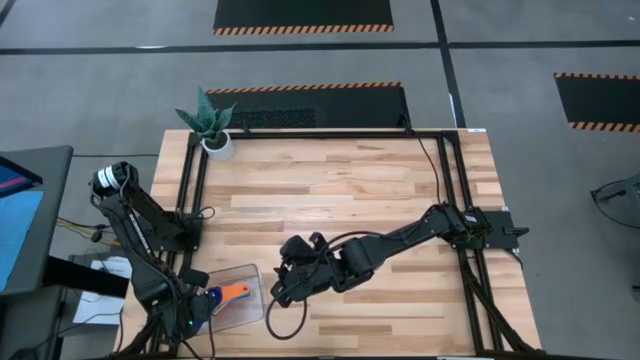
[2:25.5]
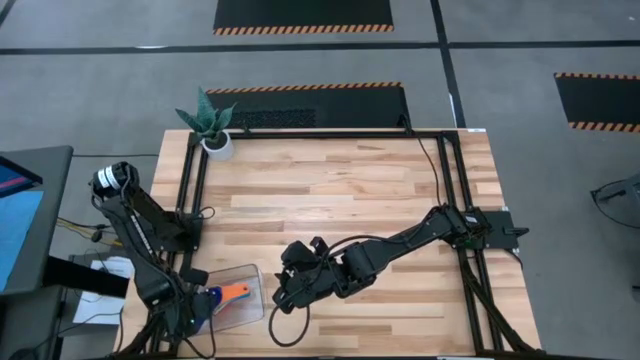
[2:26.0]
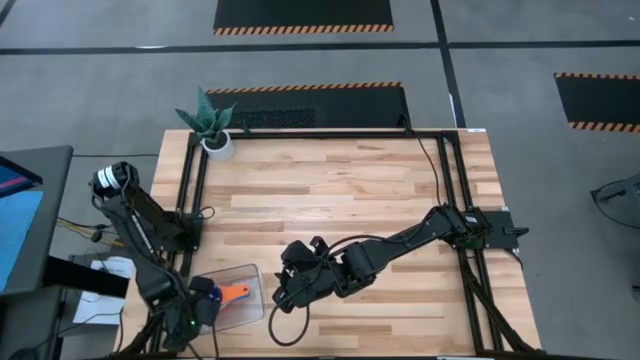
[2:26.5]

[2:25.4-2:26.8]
Task: Nest measuring cups in basket
Stack the dark blue measuring cup on top of the orange measuring cup in the transparent bin

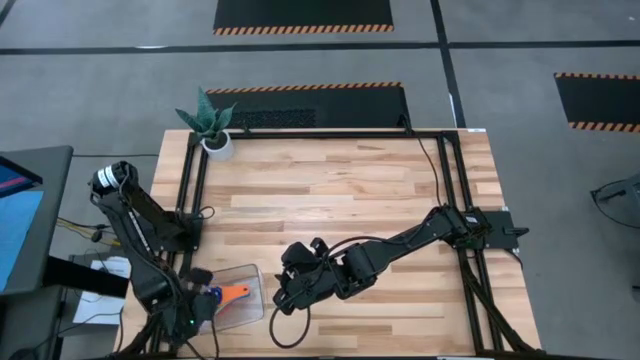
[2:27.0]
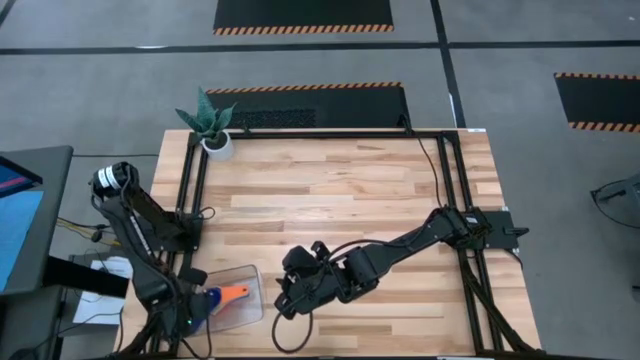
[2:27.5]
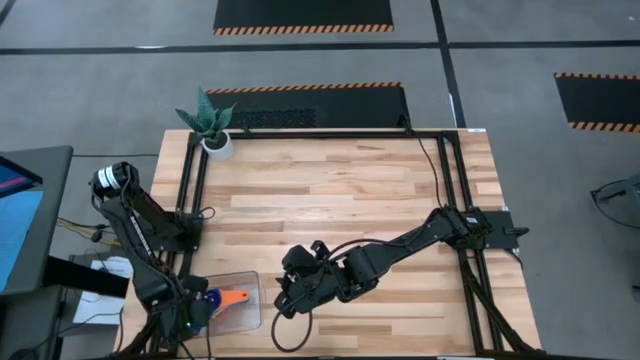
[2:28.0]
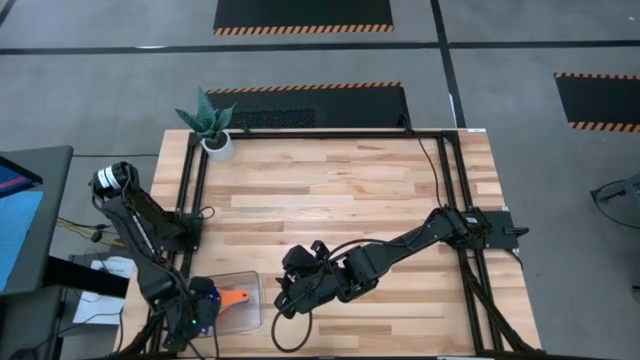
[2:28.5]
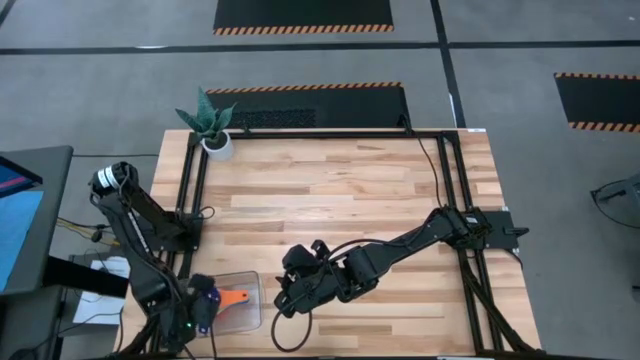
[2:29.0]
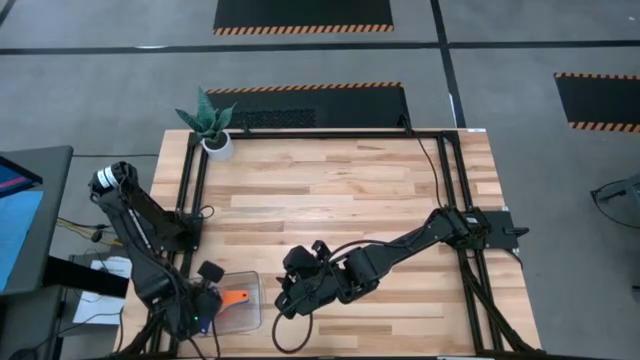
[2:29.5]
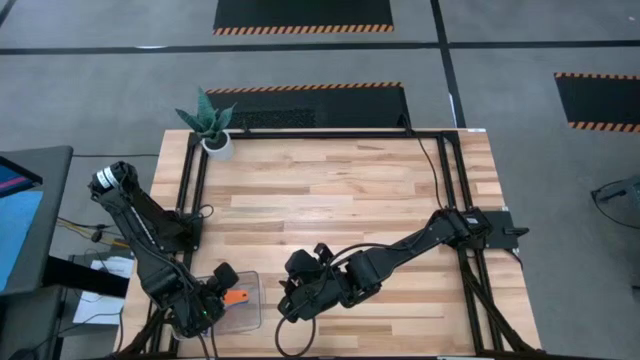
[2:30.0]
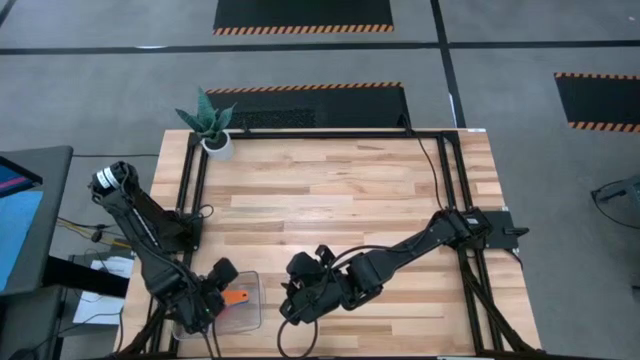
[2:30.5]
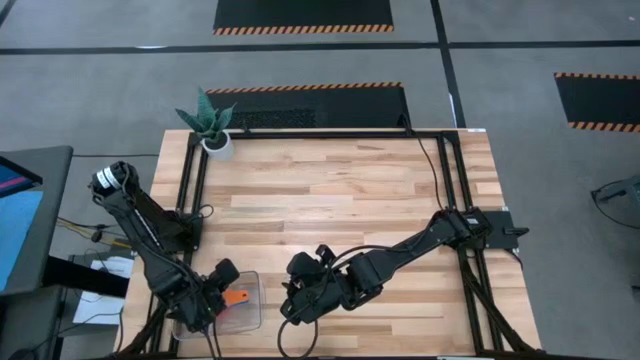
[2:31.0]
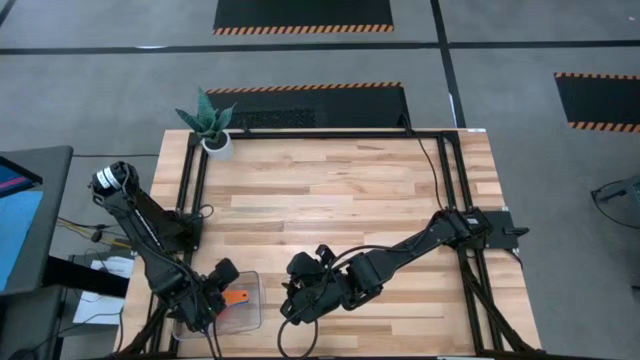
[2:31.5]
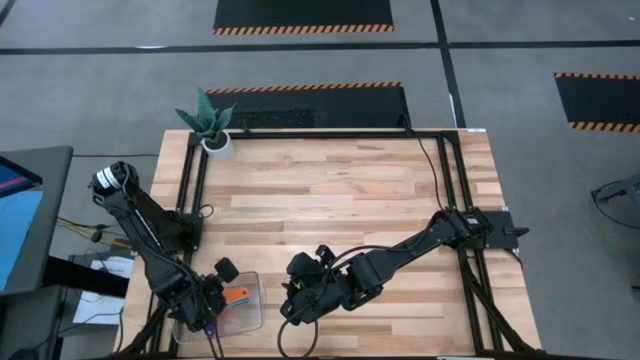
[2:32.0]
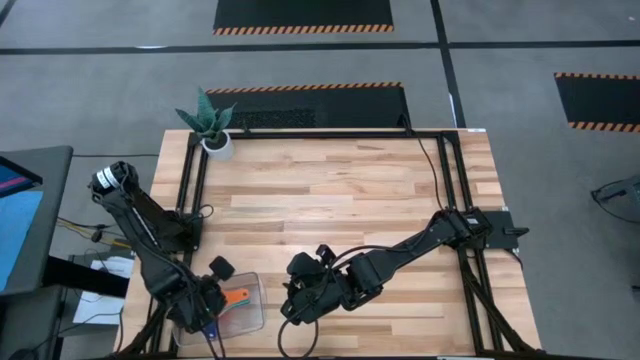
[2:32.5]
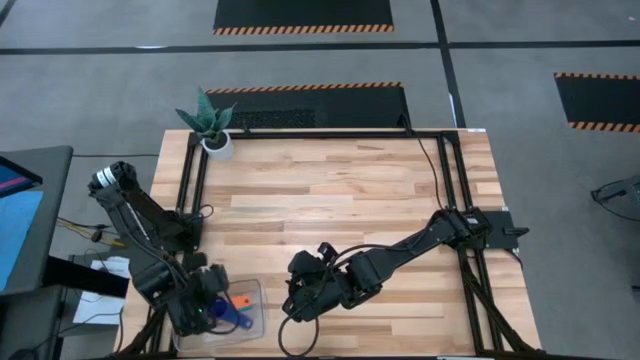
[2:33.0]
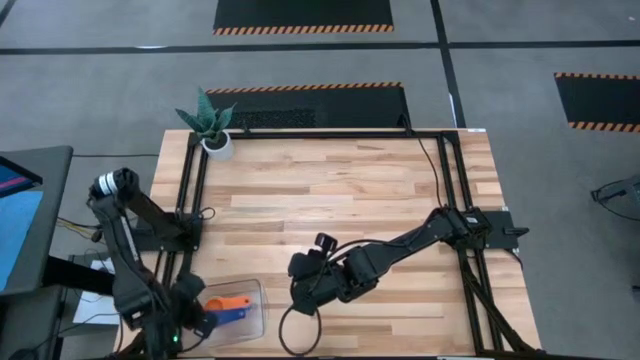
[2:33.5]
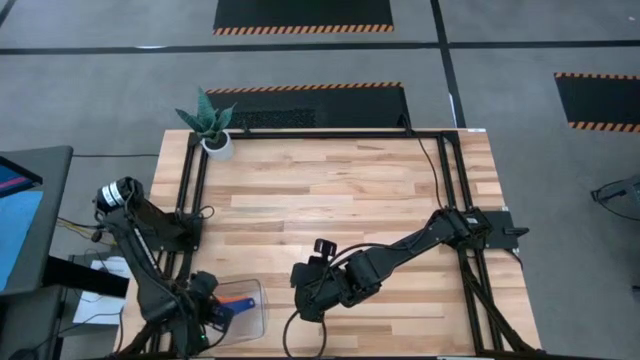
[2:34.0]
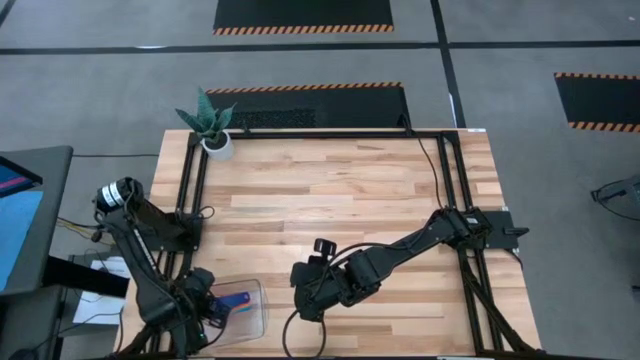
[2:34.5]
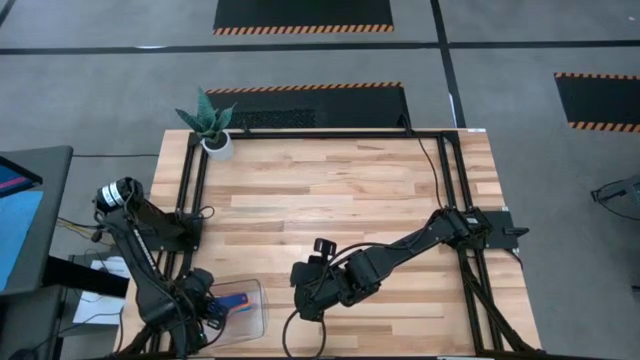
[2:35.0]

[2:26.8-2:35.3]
Stack the dark blue measuring cup on top of the orange measuring cup in the transparent bin

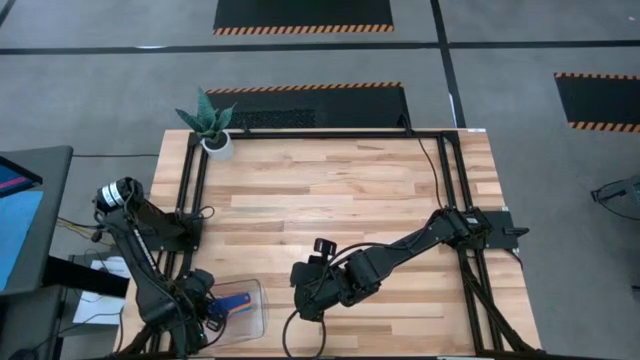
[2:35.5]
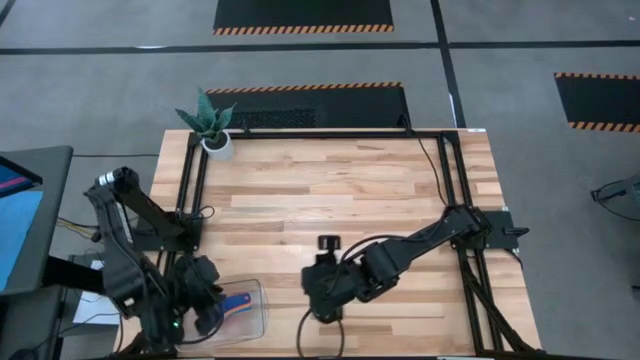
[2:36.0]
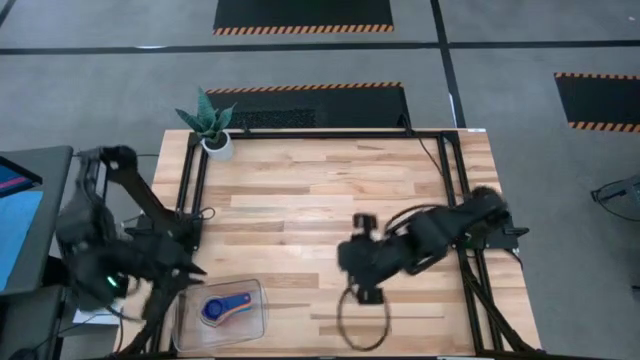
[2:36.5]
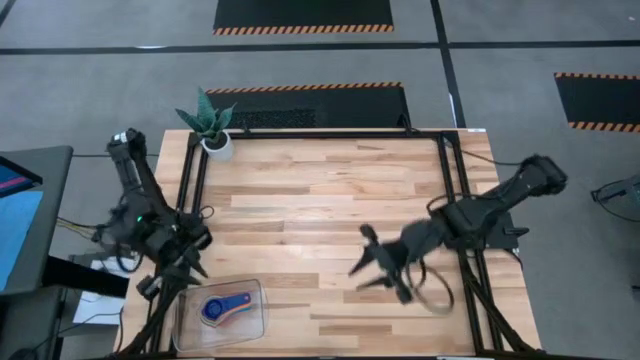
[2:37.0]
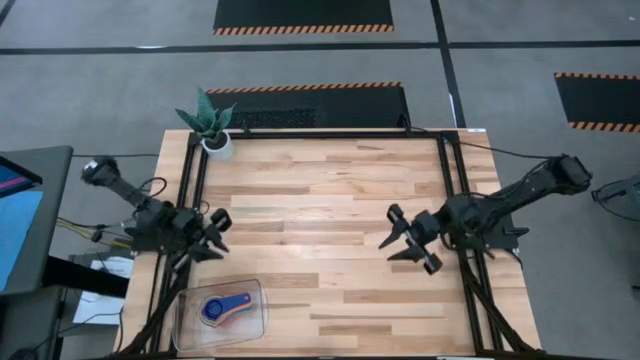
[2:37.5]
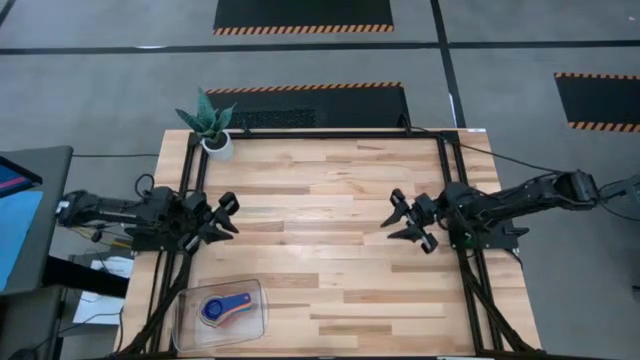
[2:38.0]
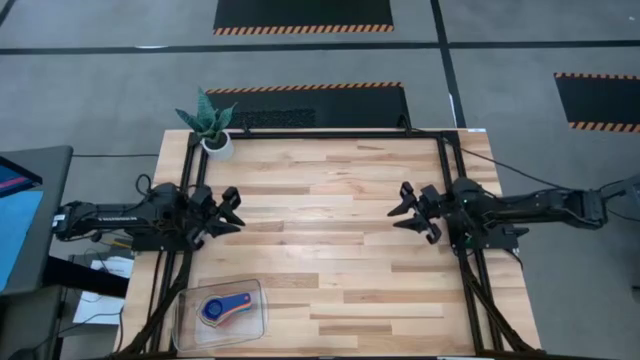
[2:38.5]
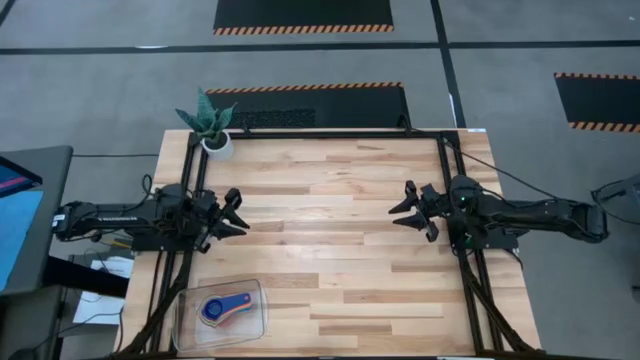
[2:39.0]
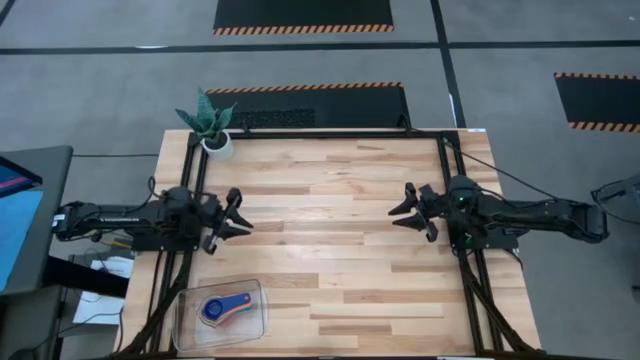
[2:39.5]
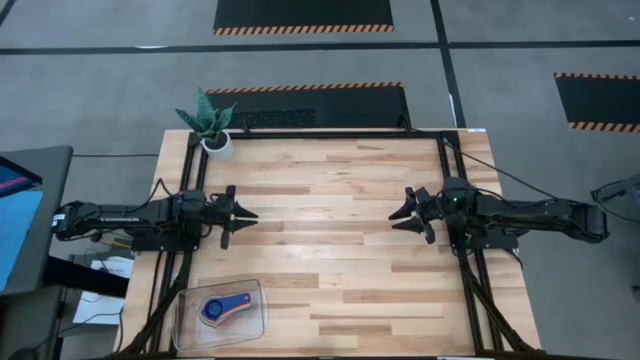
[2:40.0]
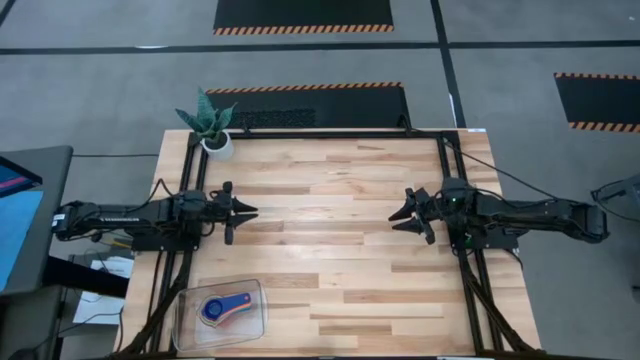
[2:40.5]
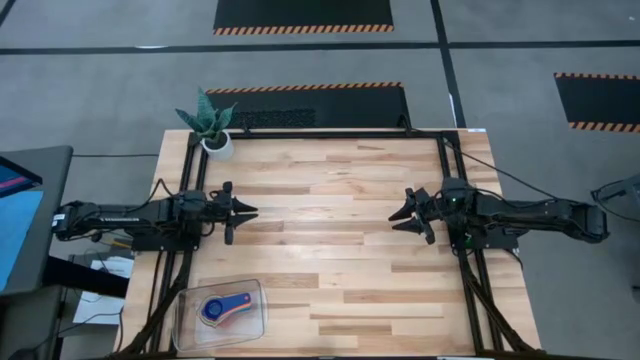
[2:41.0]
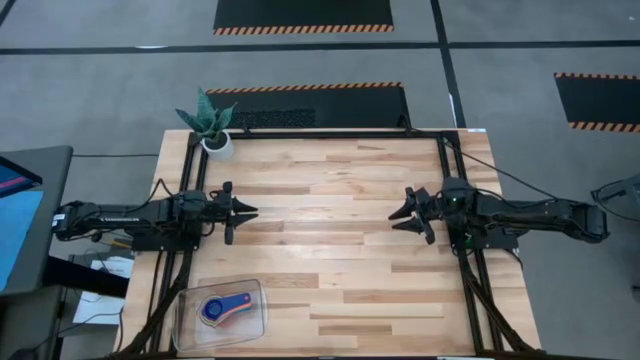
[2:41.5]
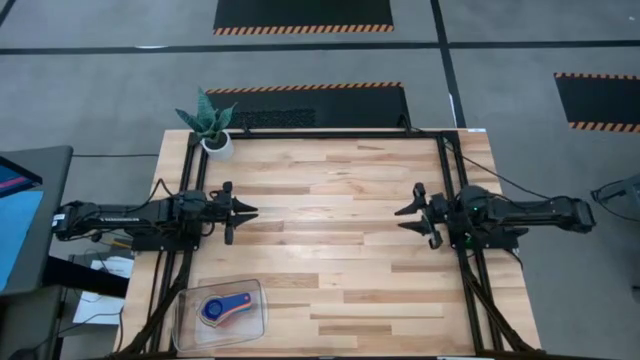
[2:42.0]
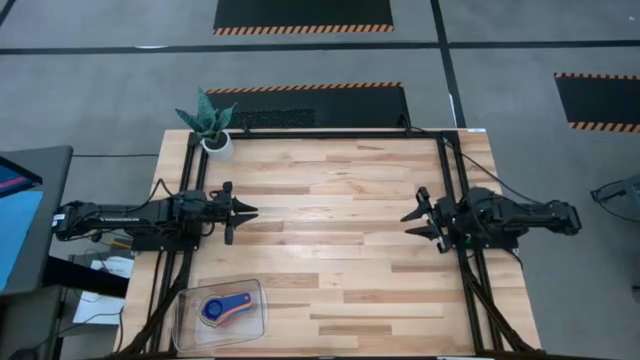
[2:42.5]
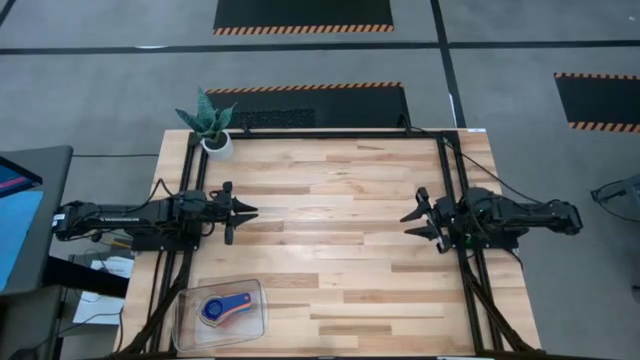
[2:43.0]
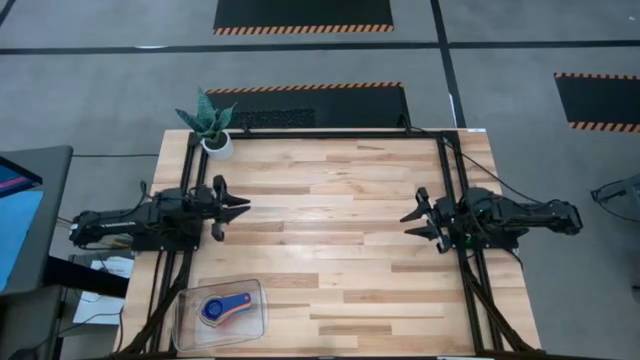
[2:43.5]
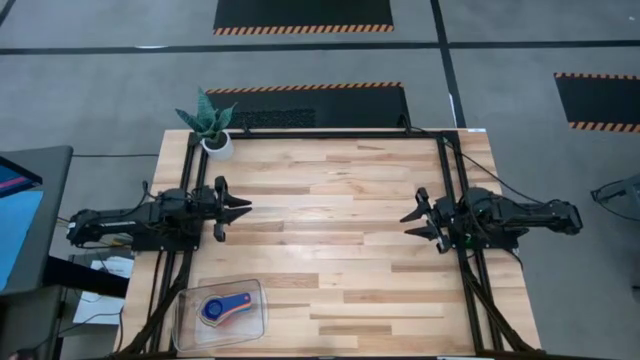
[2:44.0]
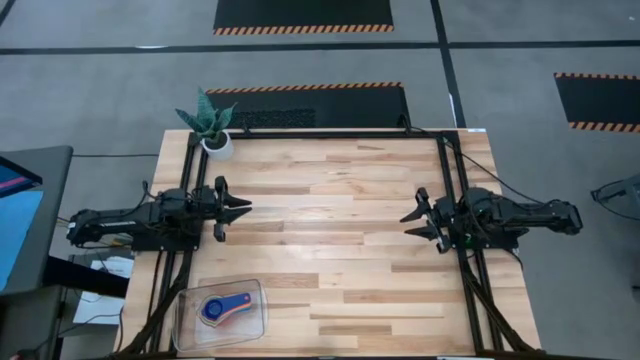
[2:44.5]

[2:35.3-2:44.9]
Return to Home Position

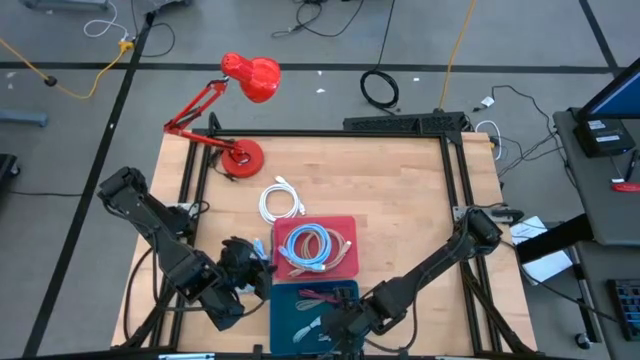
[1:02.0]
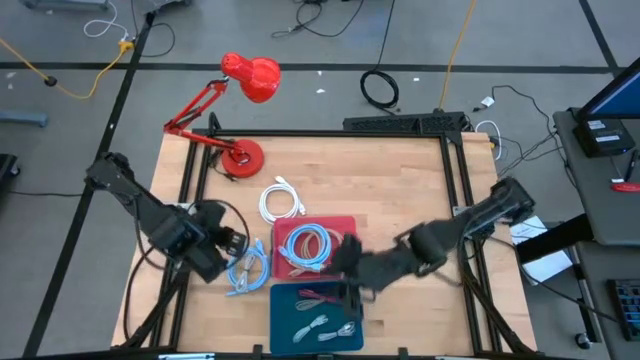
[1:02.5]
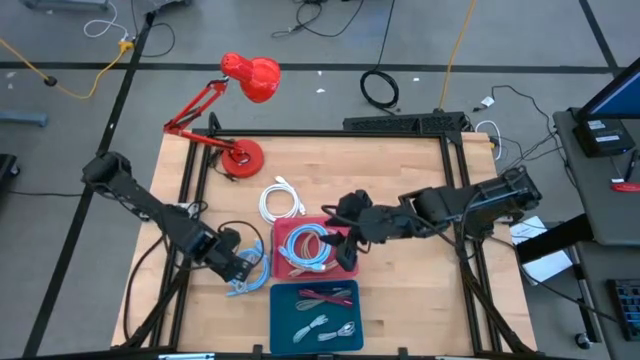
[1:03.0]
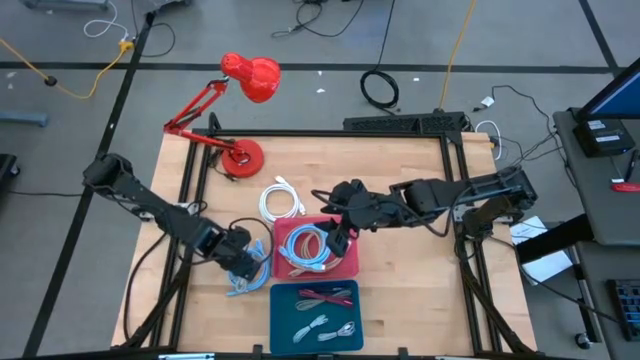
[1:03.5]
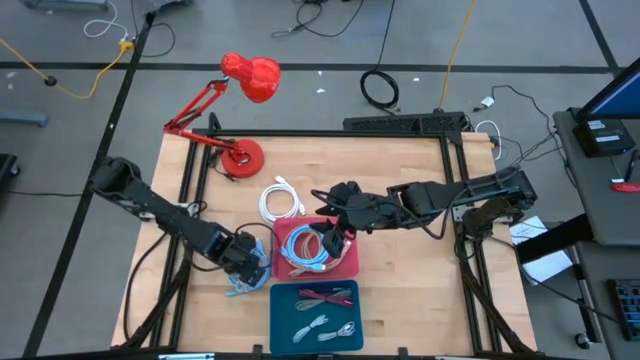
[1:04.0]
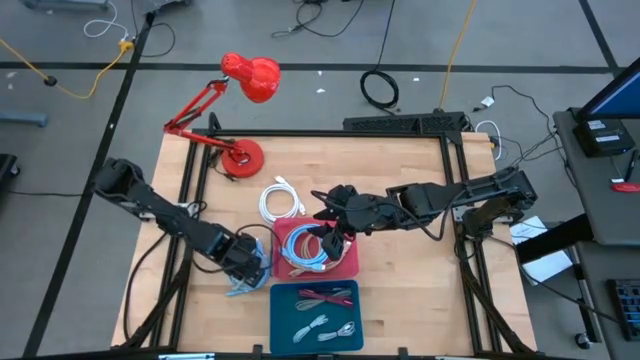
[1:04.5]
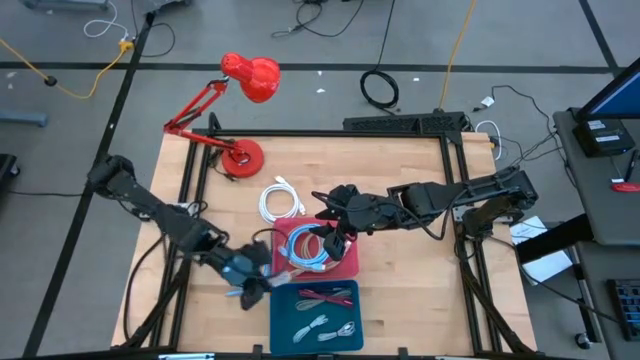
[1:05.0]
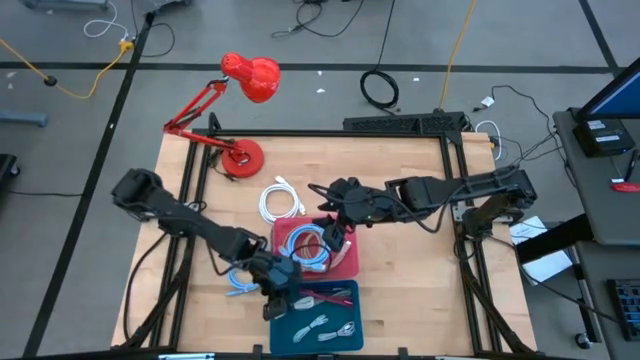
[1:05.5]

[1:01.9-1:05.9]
Task: Pick & Place USB Port
Put the white charger cable into the blue bin
